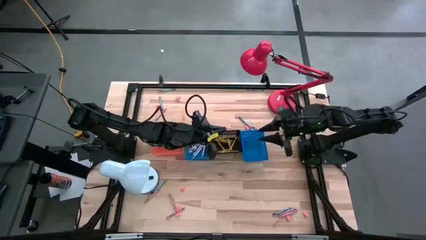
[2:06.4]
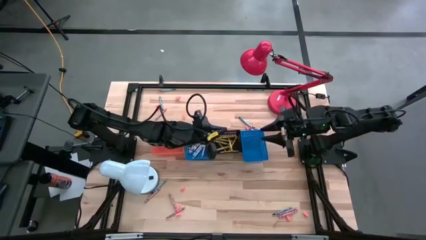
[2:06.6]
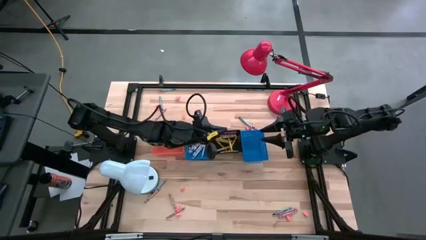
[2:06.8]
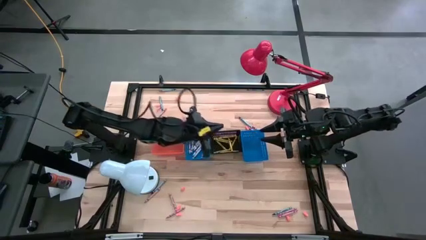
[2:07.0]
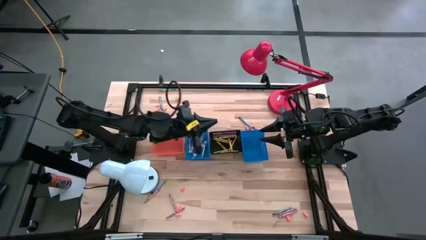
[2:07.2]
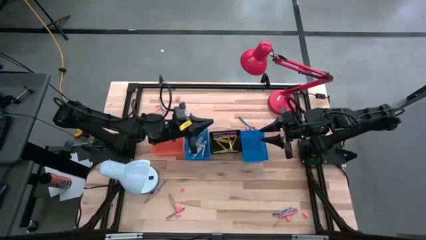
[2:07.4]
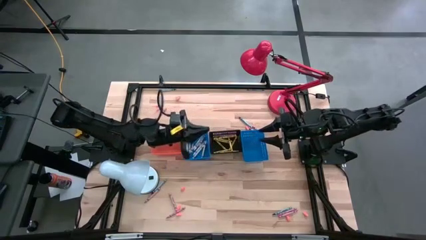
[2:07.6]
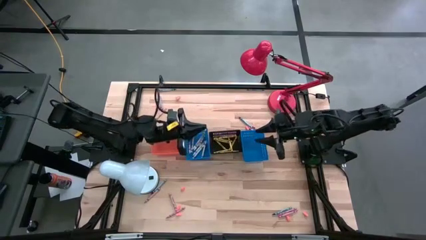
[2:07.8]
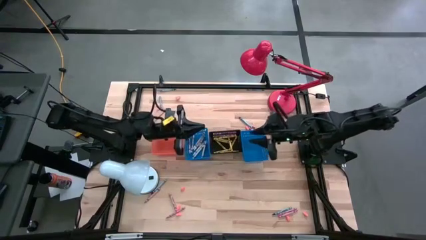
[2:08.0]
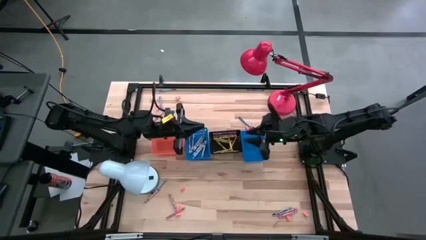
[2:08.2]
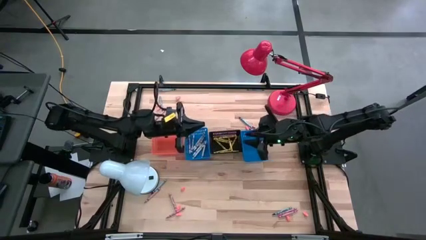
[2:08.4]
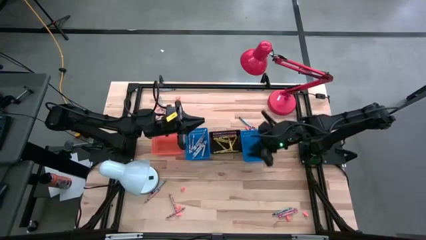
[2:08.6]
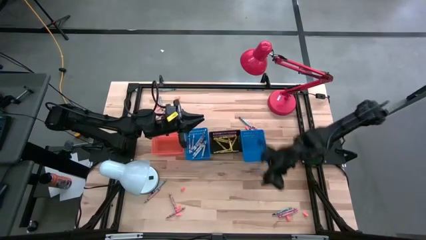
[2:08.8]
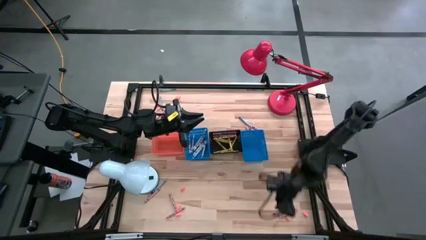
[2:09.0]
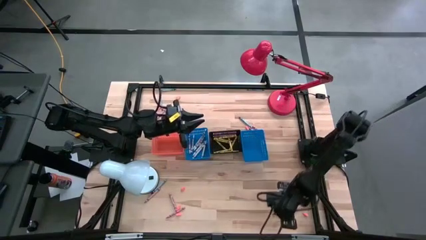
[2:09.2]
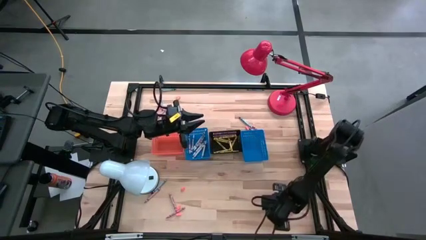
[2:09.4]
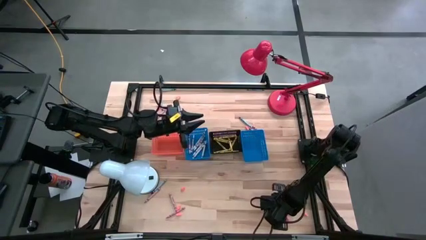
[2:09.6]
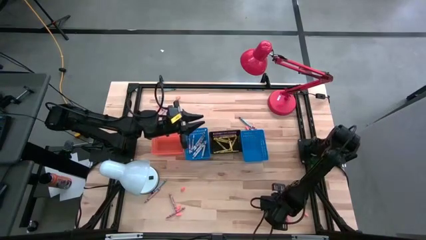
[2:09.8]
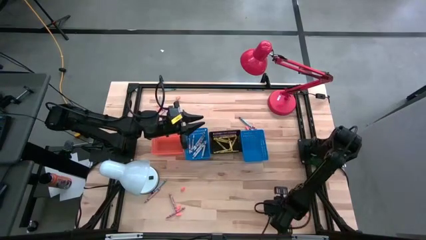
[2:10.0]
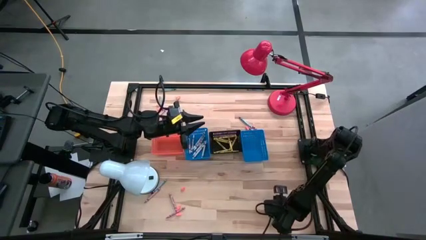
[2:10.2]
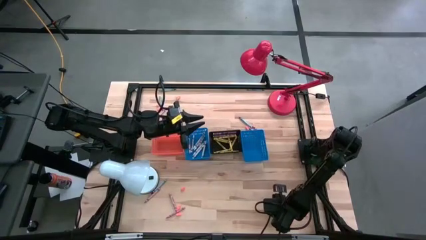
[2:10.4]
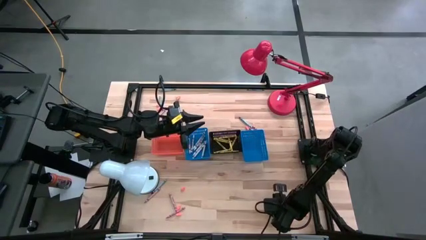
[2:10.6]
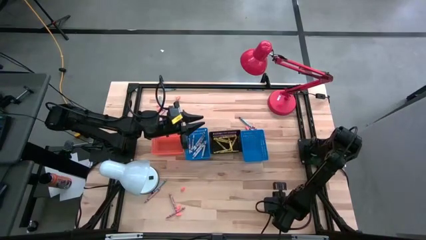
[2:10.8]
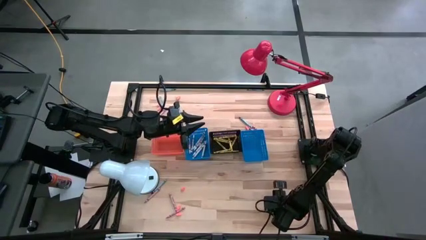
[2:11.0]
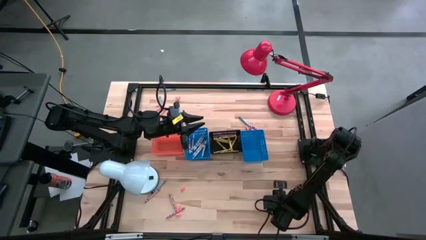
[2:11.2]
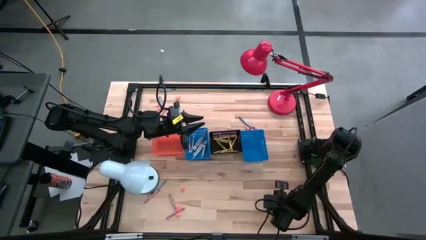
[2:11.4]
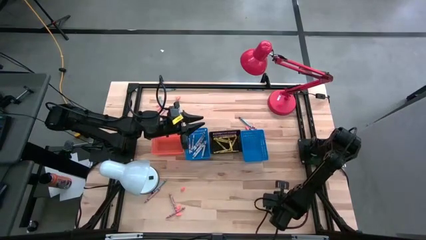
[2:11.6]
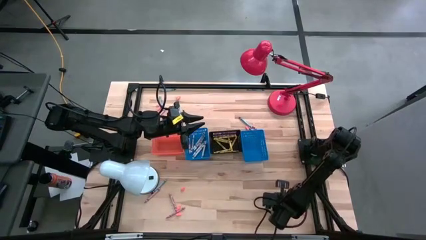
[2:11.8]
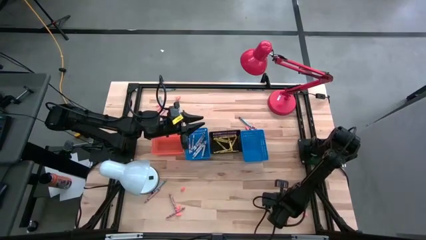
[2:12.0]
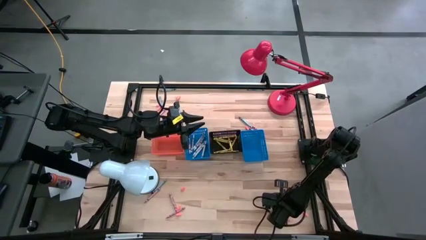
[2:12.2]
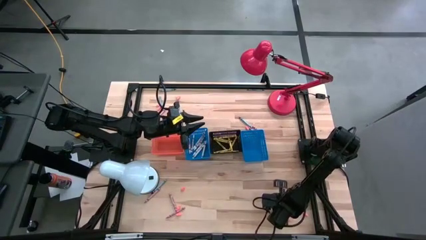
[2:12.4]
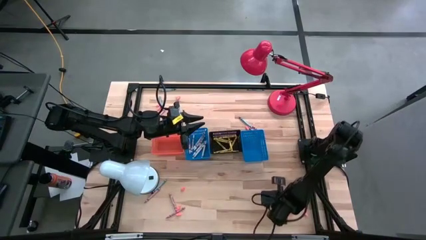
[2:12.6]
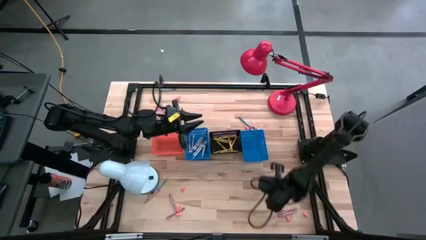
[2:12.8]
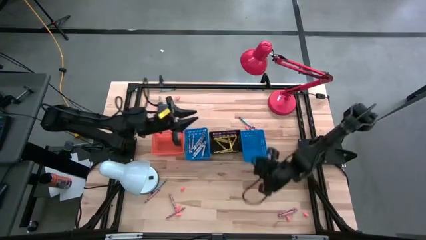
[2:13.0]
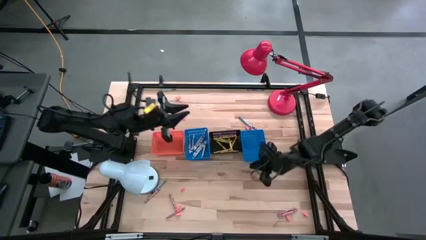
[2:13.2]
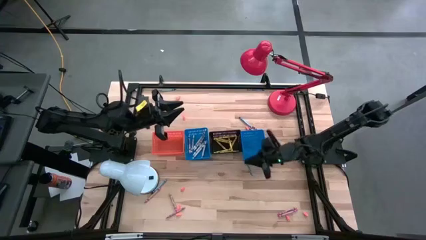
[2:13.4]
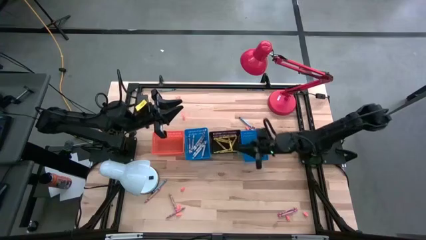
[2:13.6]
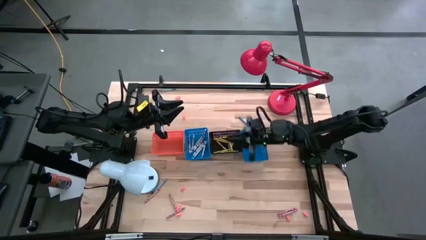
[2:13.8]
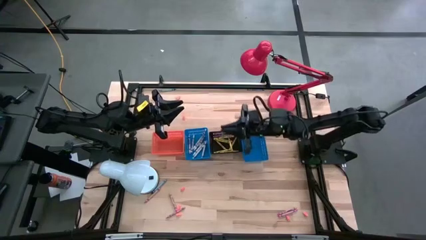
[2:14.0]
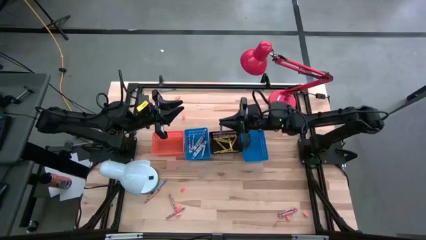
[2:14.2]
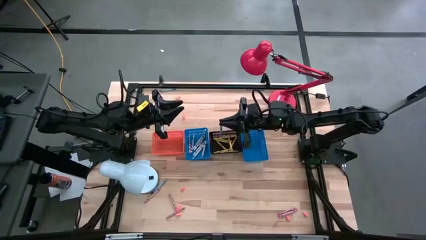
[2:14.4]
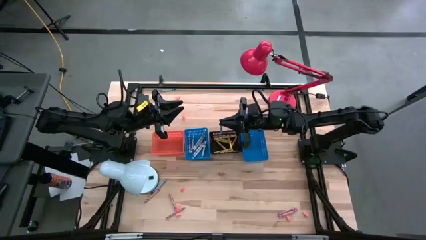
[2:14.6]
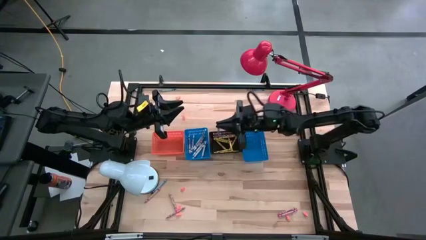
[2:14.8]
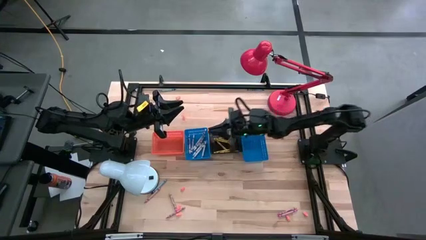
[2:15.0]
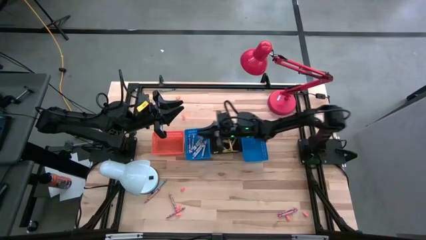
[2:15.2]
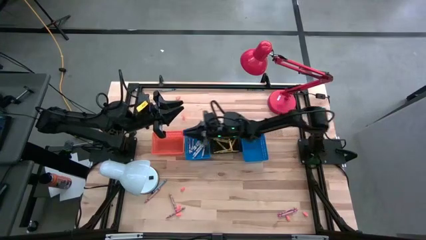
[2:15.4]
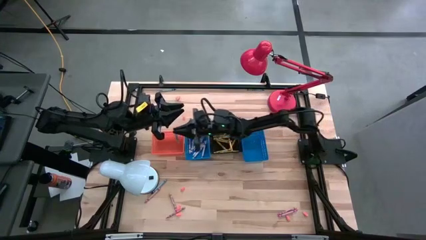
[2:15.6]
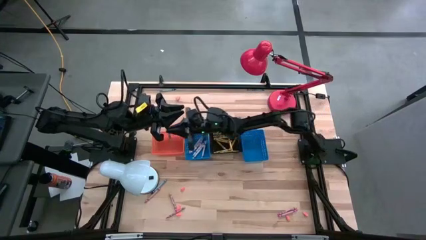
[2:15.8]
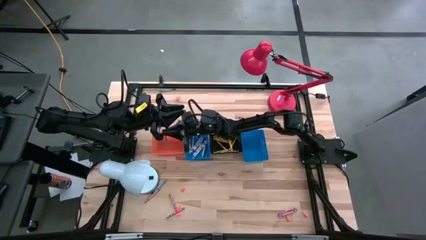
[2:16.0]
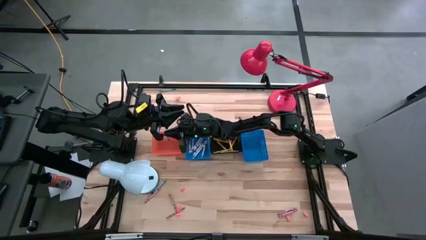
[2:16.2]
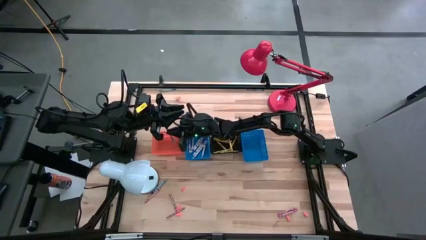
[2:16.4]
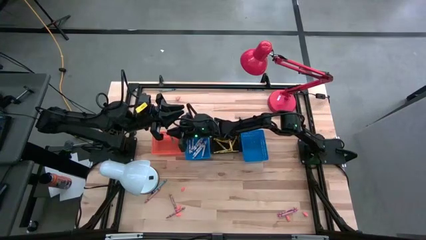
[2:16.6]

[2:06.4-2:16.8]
Task: Sort crayons
Put the blue crayon into the orange bin

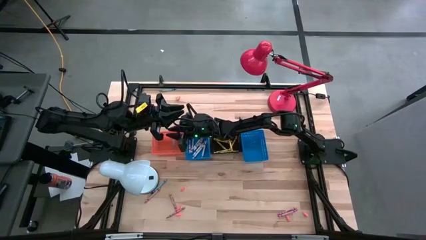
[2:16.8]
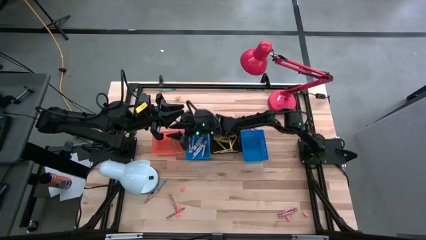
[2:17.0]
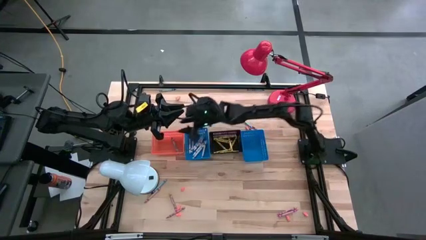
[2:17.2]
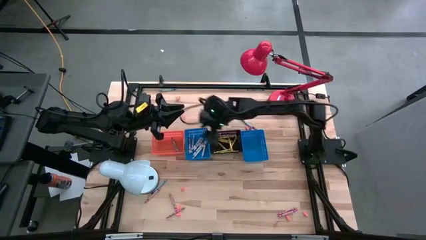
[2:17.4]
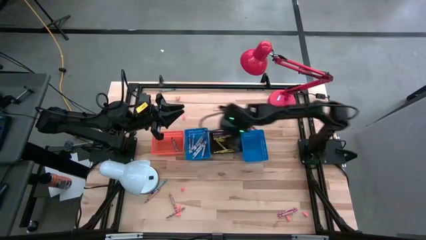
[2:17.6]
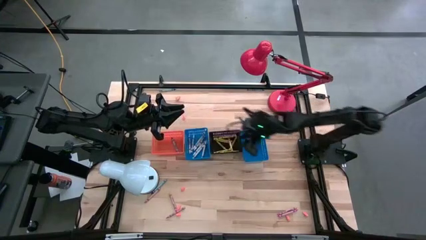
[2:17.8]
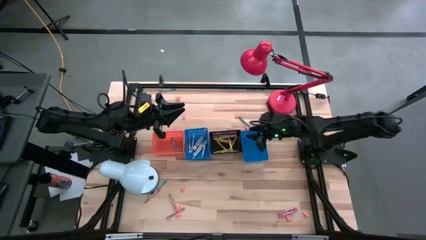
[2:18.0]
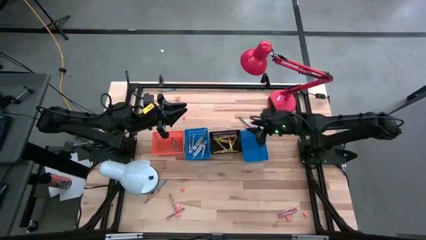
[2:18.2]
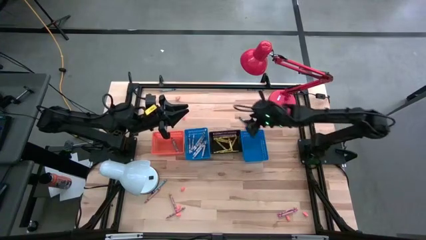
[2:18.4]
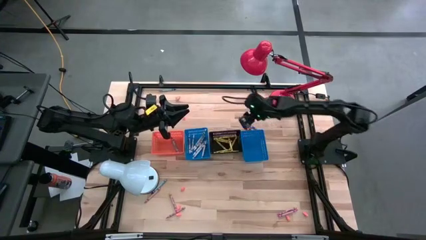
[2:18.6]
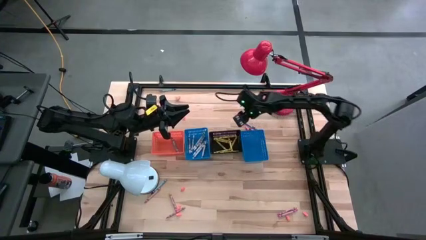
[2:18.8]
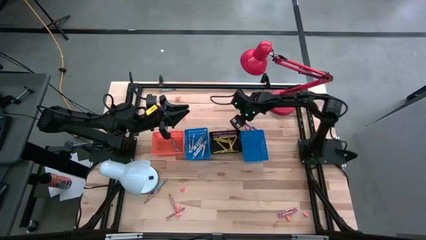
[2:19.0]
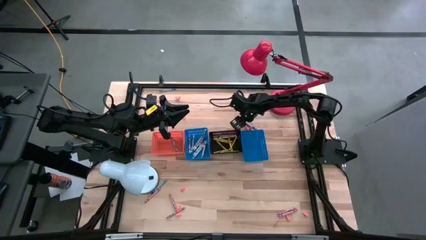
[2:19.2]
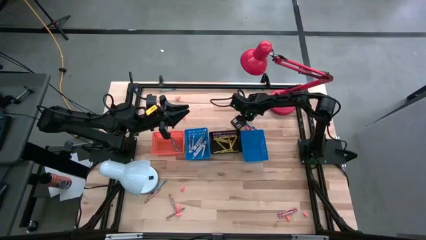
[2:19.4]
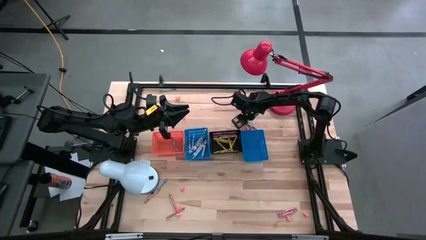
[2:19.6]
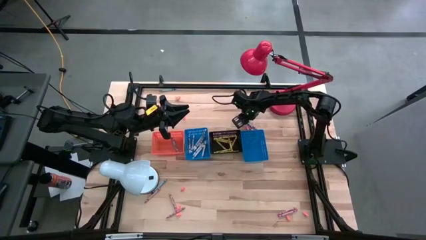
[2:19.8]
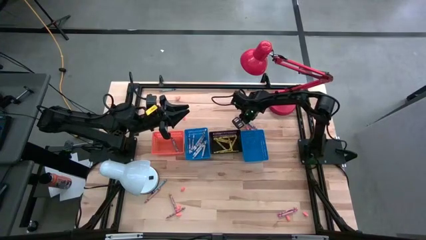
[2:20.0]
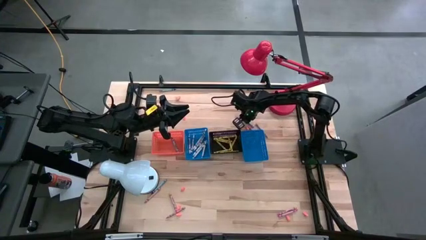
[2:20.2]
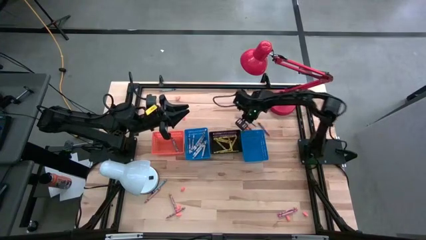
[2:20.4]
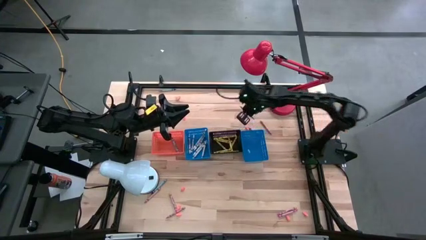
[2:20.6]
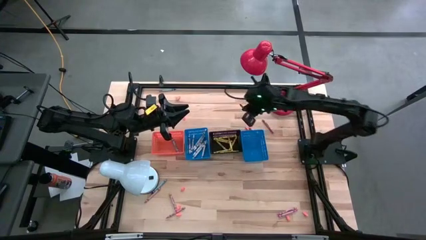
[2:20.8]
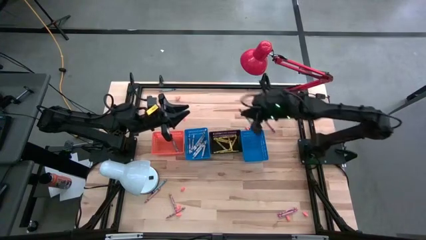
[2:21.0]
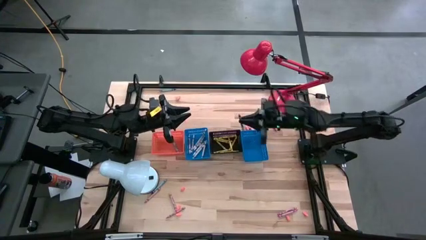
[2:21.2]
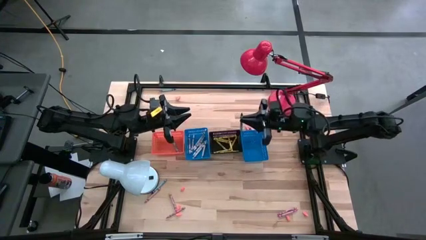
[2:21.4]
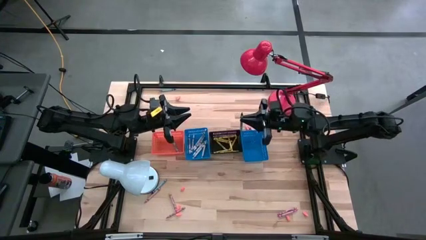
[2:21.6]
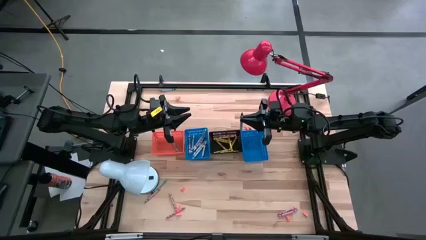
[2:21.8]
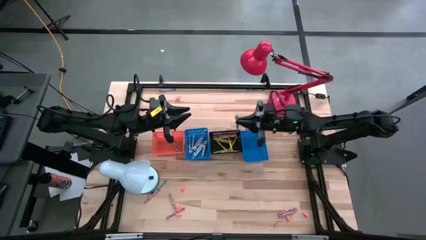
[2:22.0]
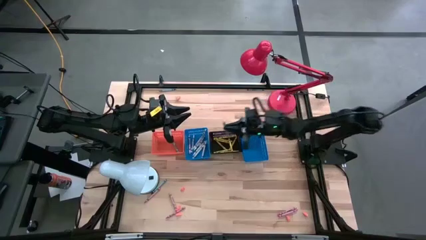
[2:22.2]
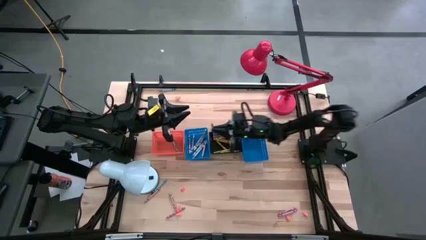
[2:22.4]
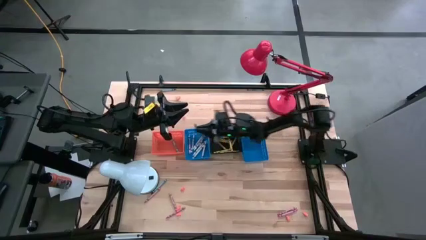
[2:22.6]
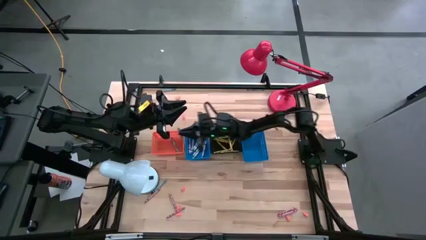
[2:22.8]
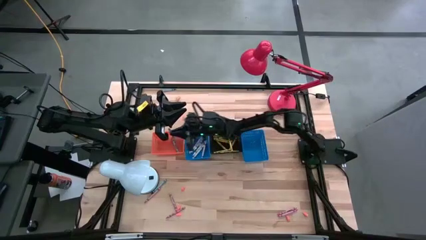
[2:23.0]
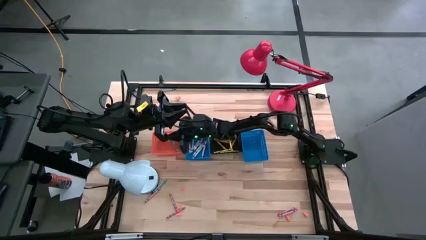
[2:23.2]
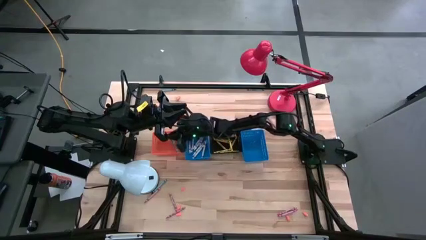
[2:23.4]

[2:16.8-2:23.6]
Put the blue crayon into the orange bin
